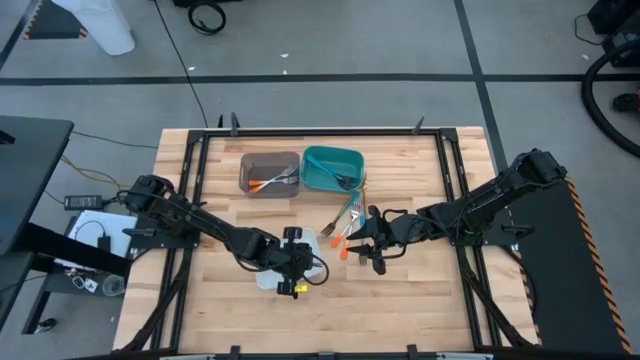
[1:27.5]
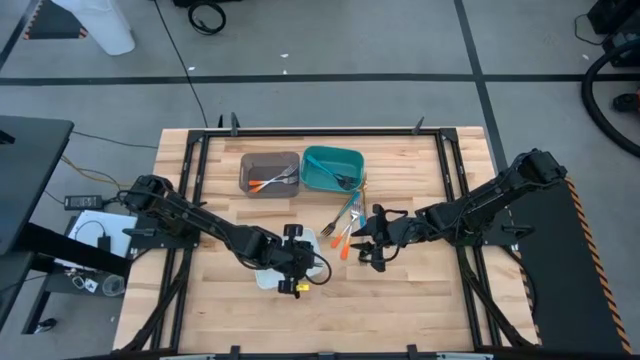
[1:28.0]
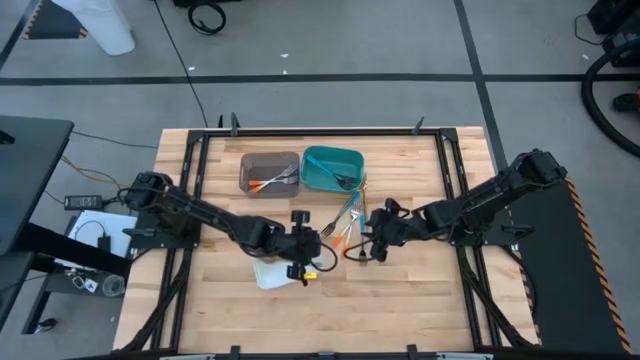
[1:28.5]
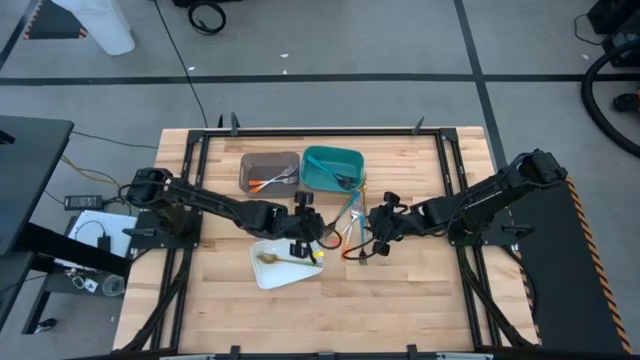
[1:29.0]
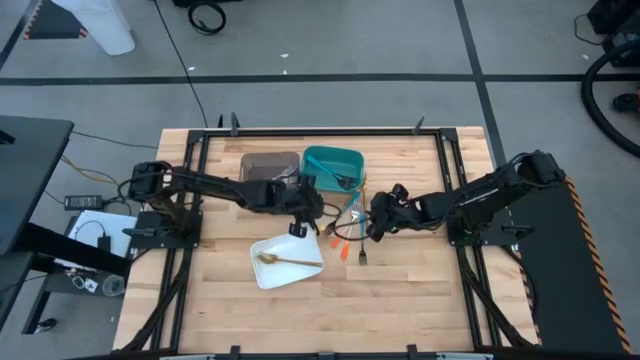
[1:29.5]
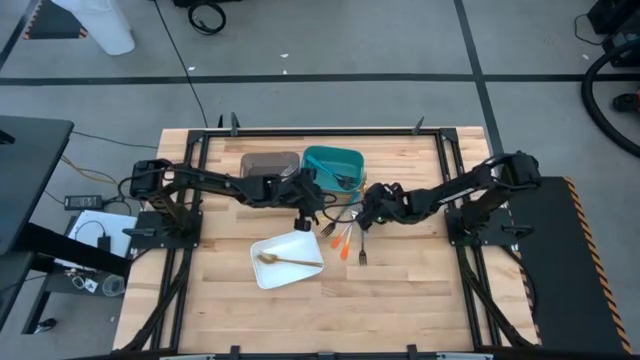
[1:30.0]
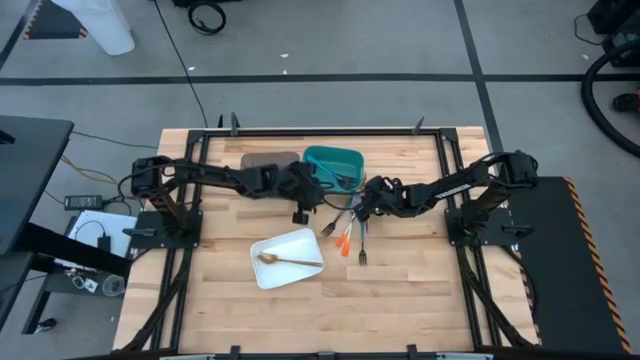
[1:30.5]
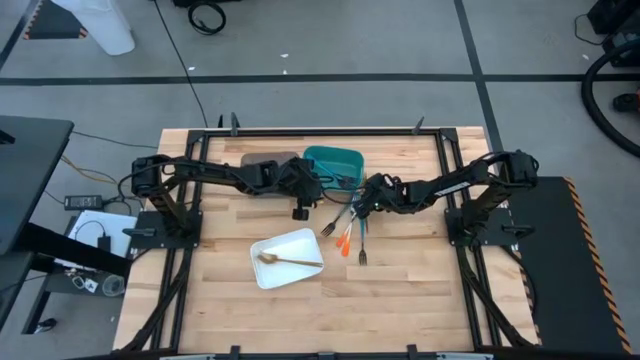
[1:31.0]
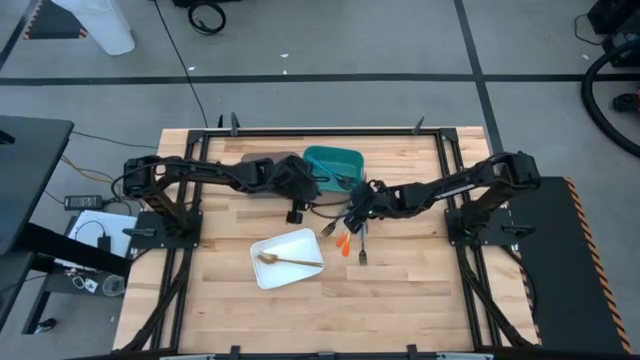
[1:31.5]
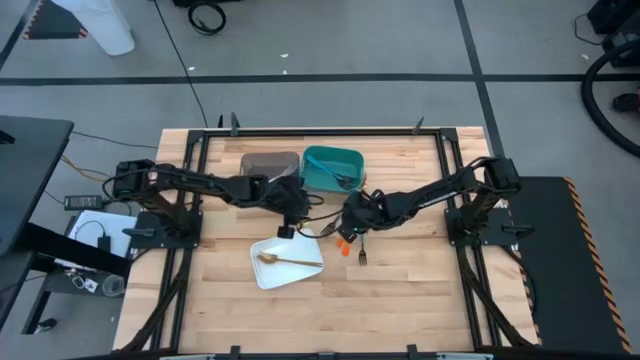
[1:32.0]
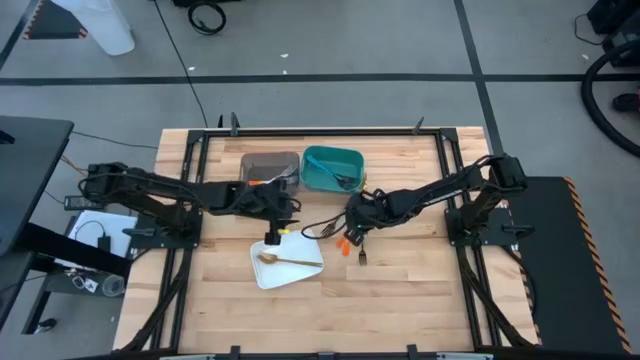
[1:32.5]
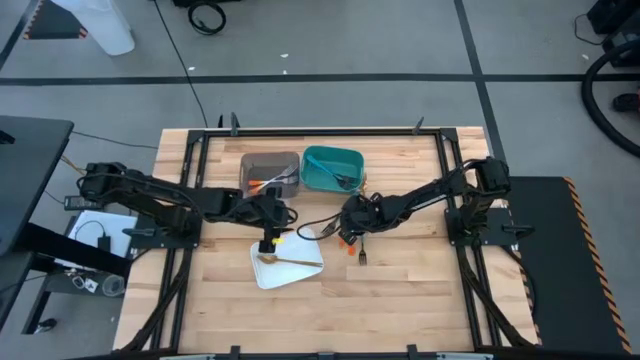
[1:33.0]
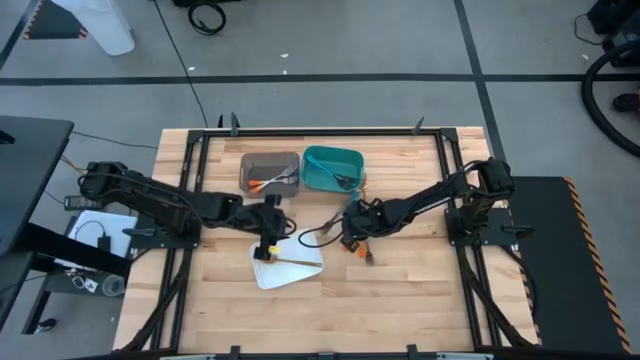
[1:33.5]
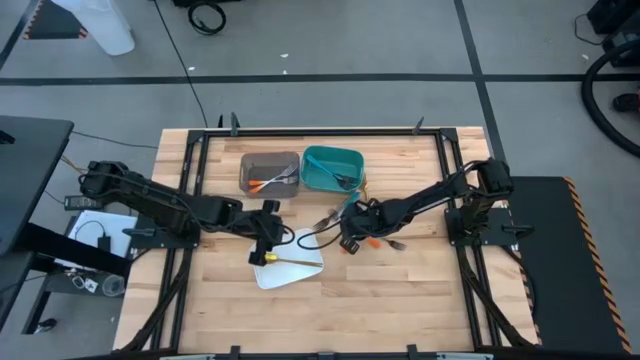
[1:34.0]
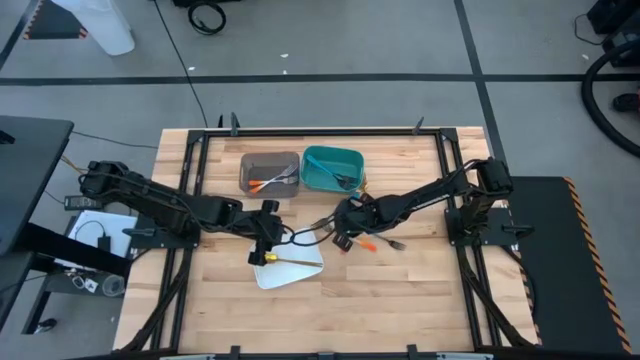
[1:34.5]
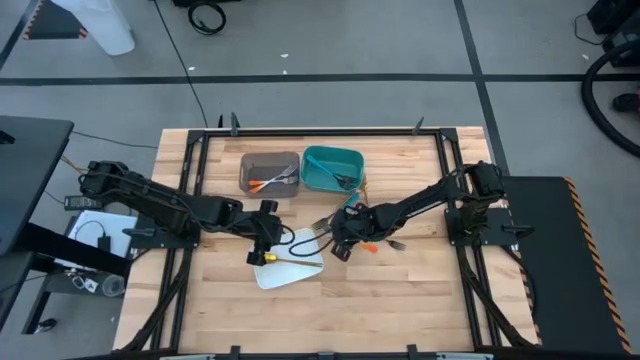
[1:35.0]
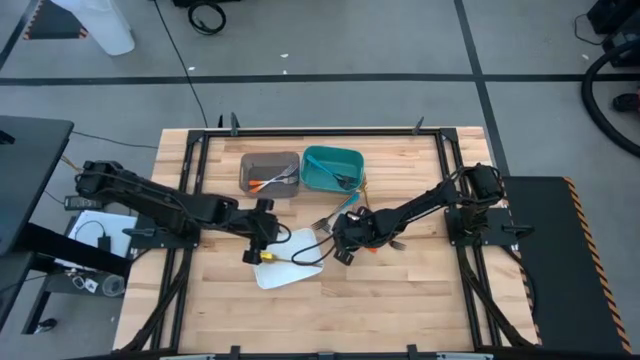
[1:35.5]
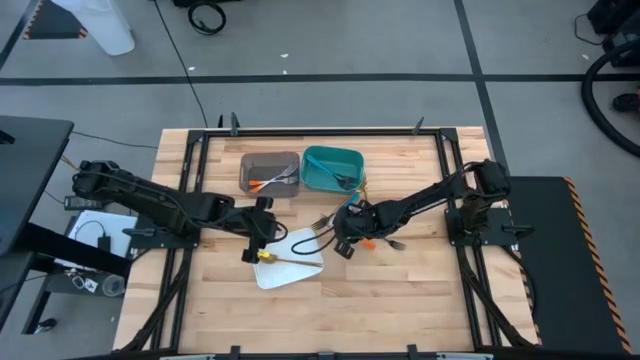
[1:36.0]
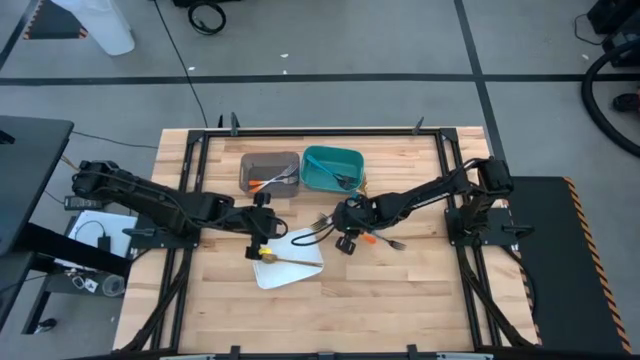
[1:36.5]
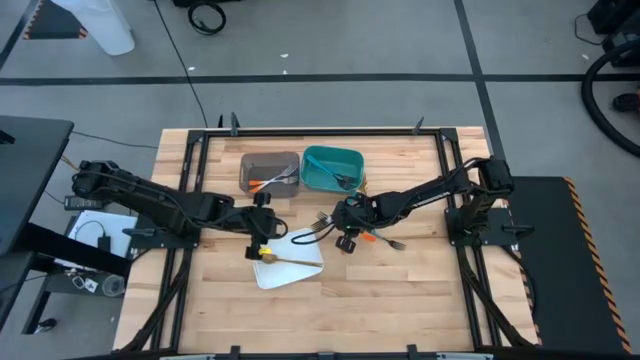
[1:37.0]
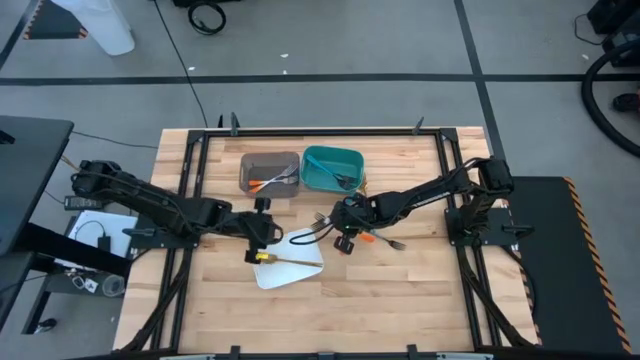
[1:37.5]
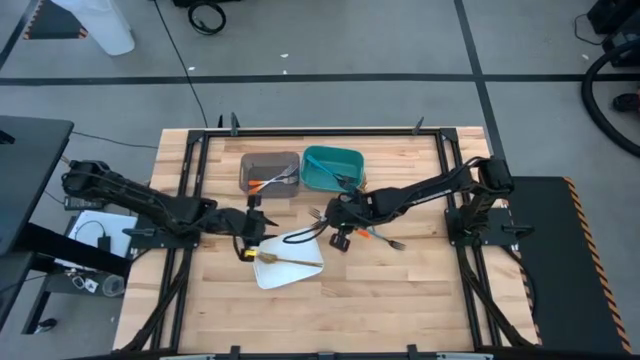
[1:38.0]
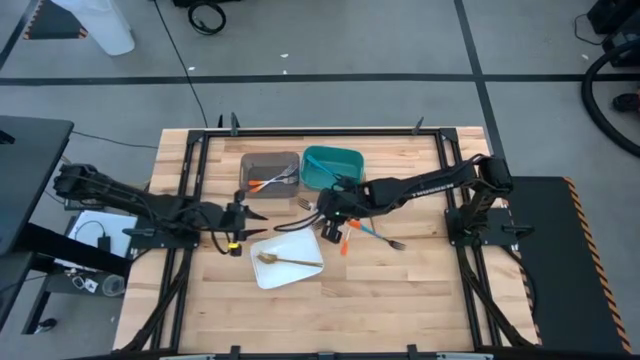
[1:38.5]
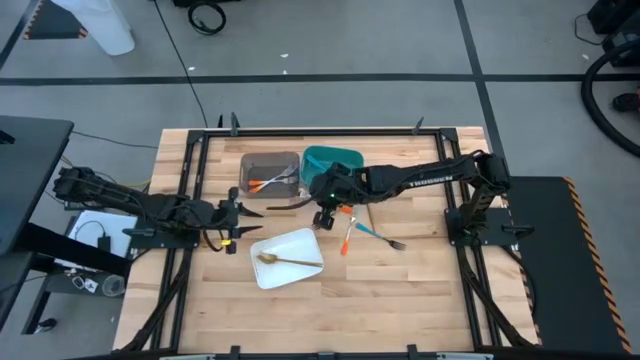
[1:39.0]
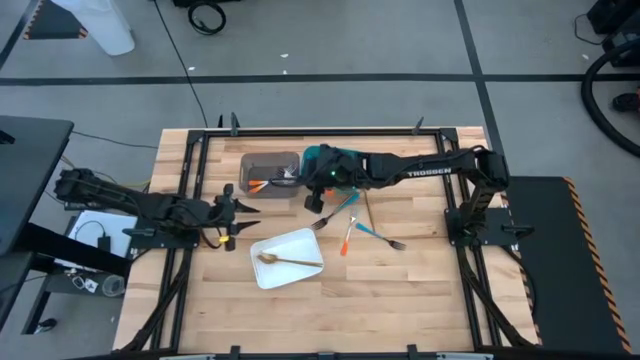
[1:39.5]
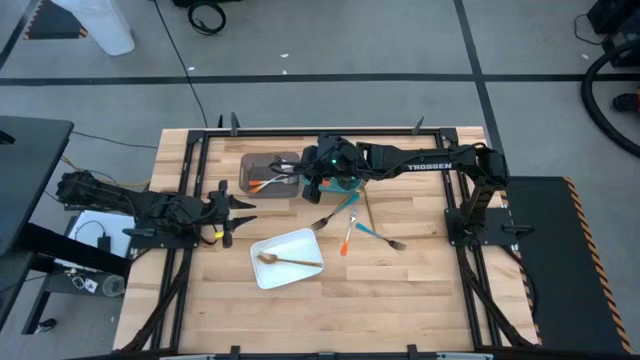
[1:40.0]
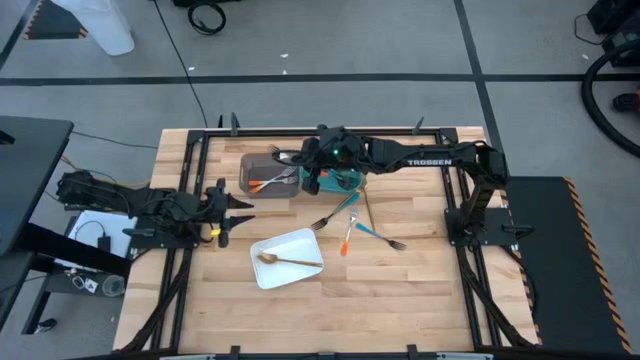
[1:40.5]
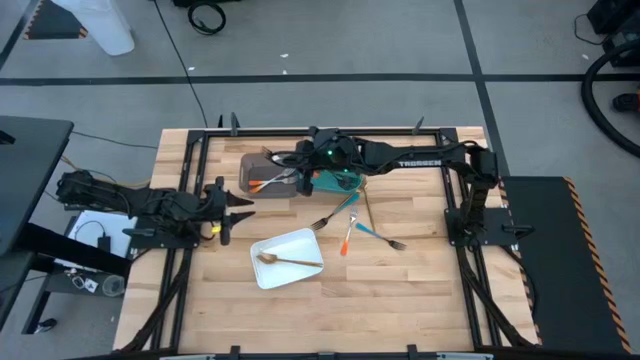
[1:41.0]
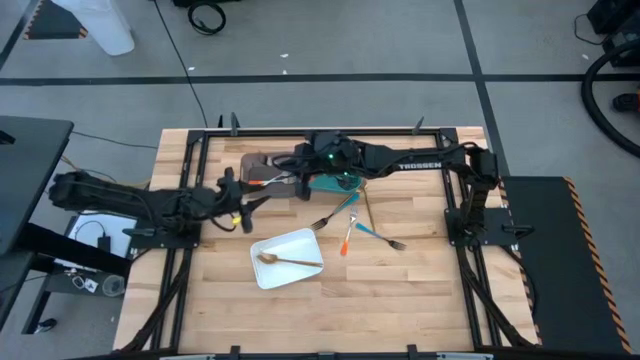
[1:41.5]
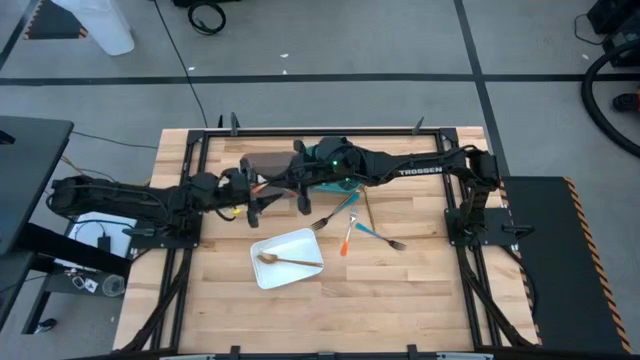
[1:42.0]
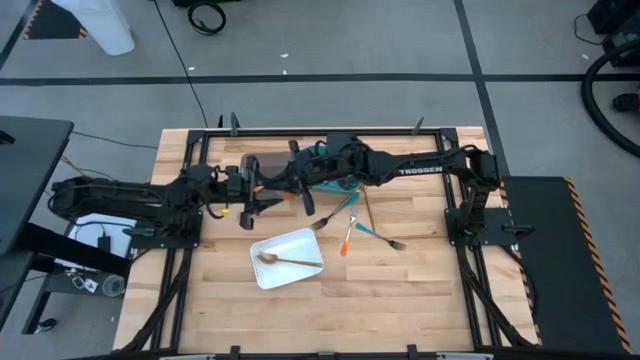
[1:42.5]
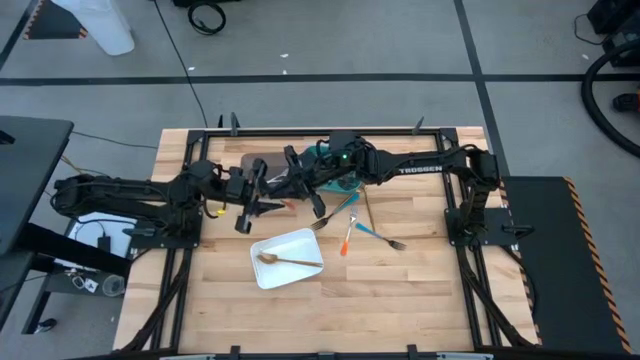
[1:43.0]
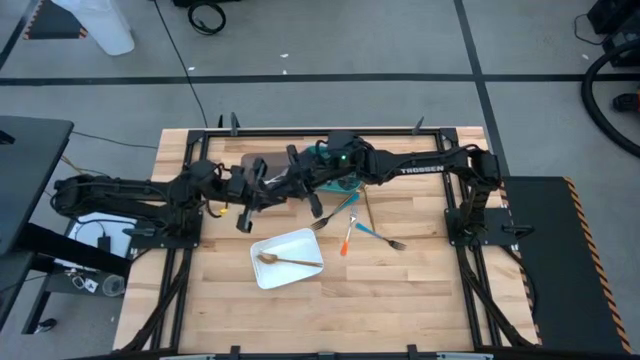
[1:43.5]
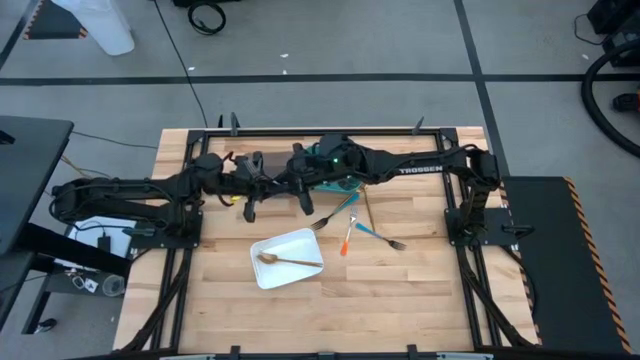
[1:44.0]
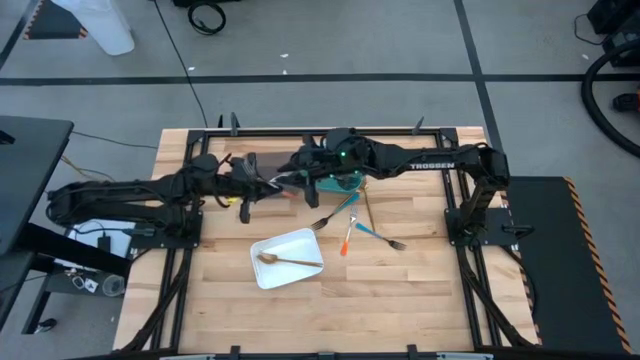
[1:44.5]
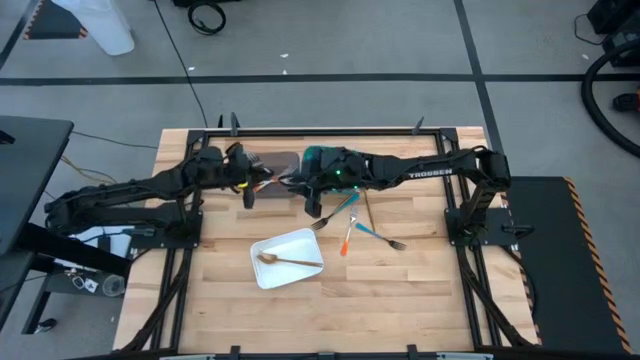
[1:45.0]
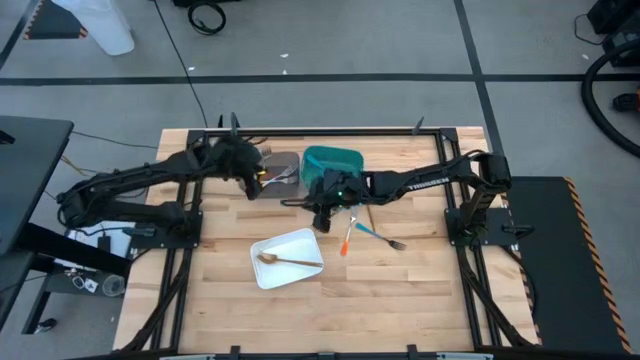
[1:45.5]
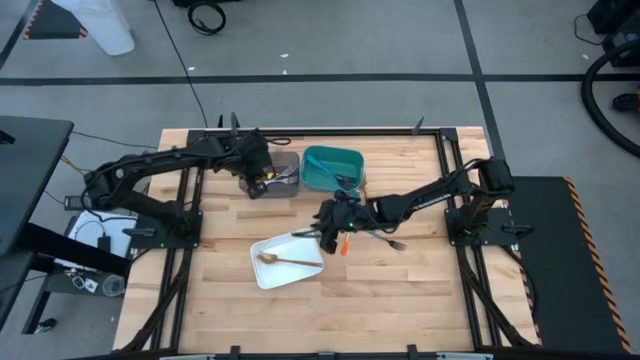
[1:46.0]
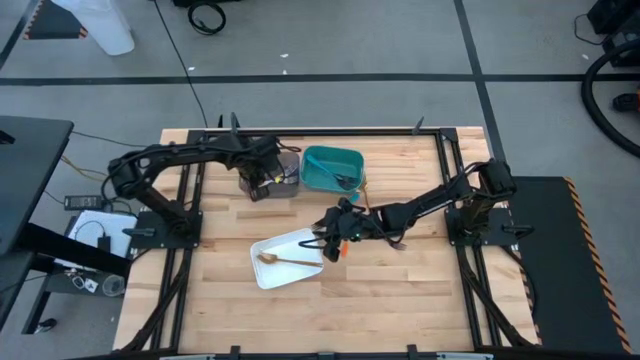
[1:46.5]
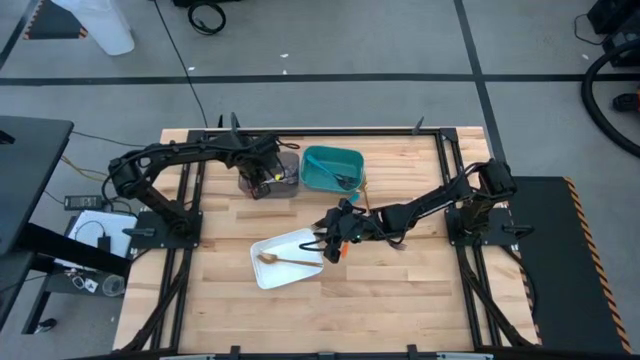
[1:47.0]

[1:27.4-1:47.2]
Task: Sort silverware by color (type)
Put the orange fork into the black bin
